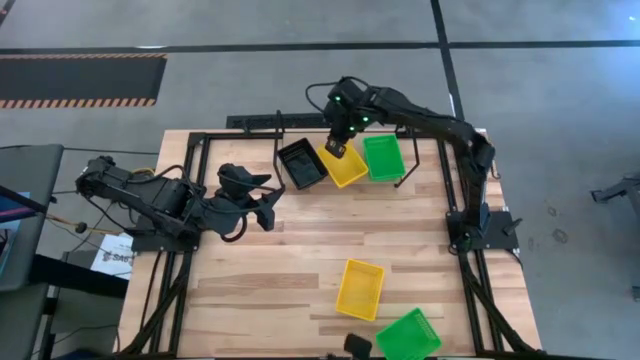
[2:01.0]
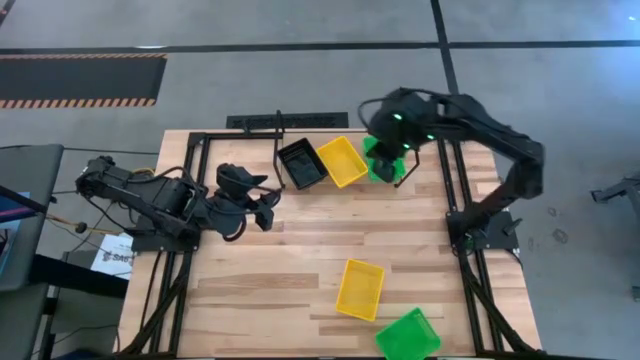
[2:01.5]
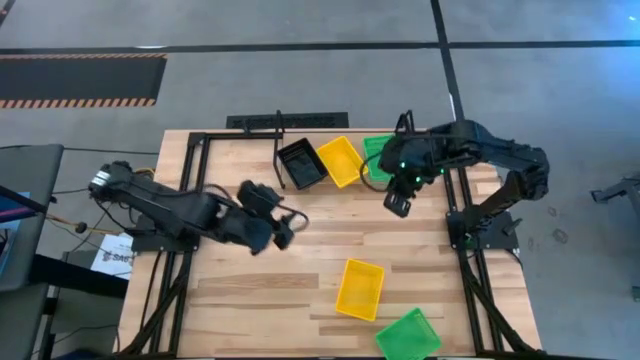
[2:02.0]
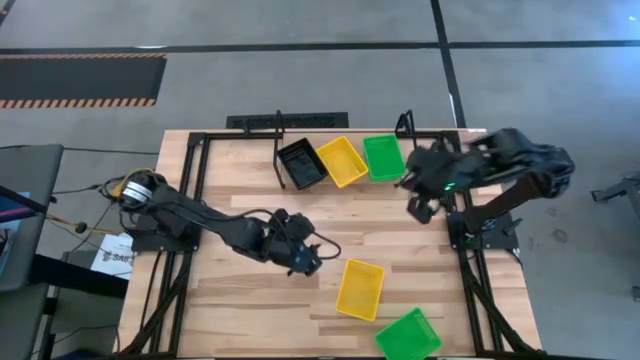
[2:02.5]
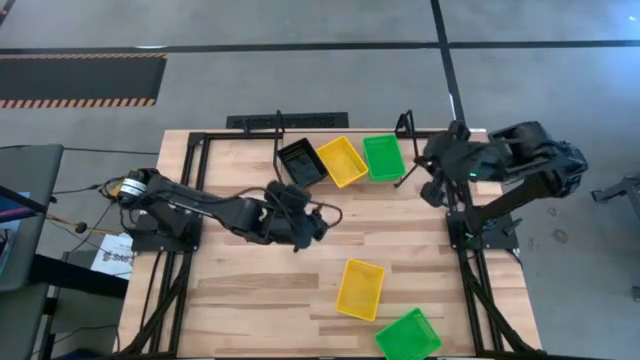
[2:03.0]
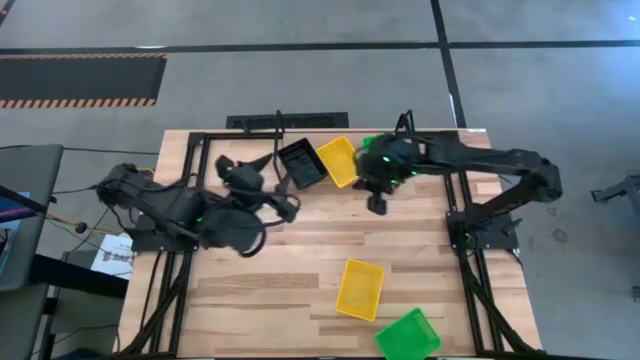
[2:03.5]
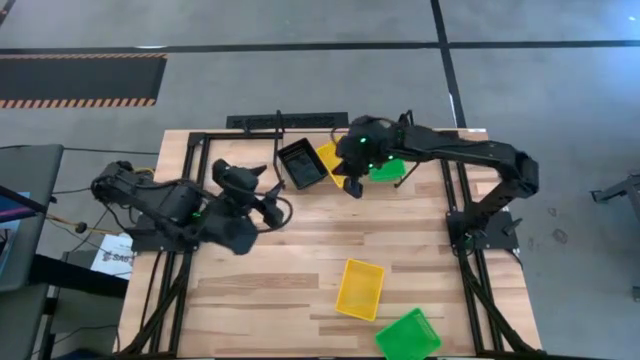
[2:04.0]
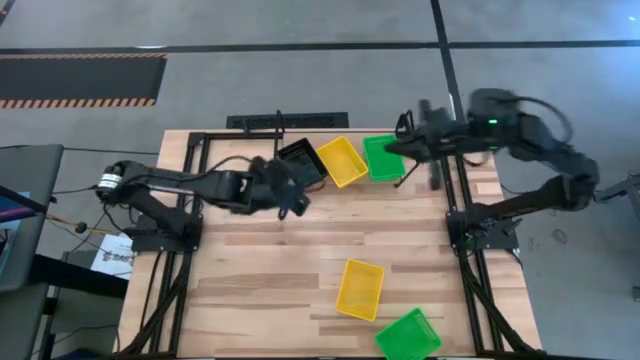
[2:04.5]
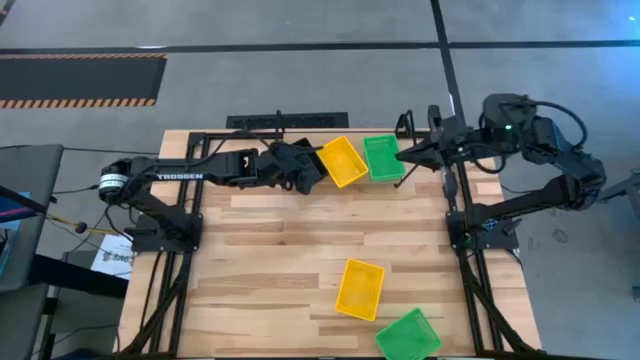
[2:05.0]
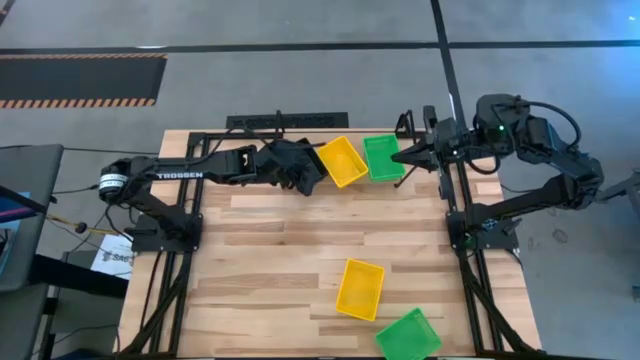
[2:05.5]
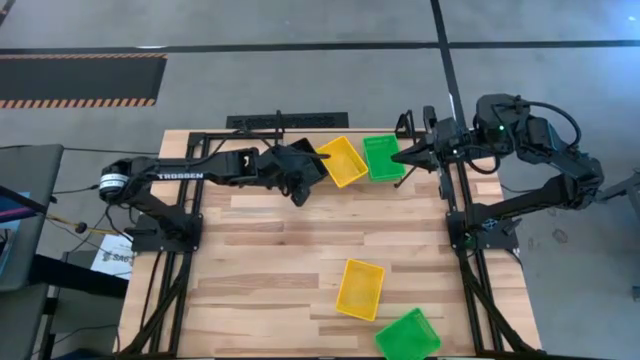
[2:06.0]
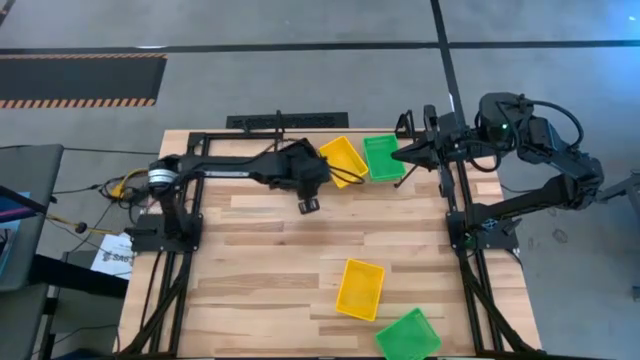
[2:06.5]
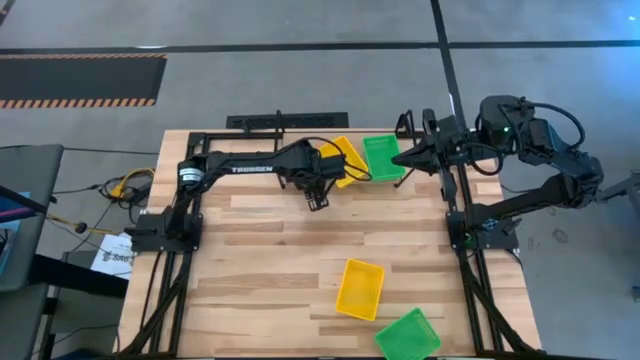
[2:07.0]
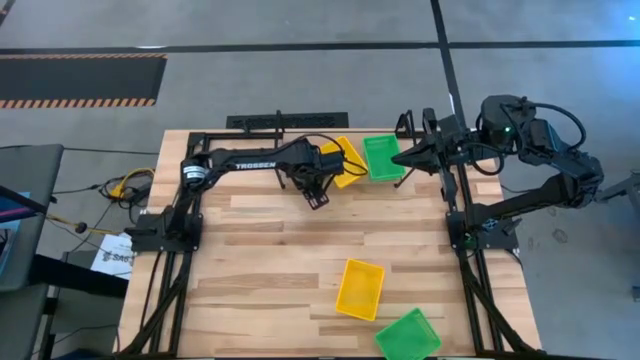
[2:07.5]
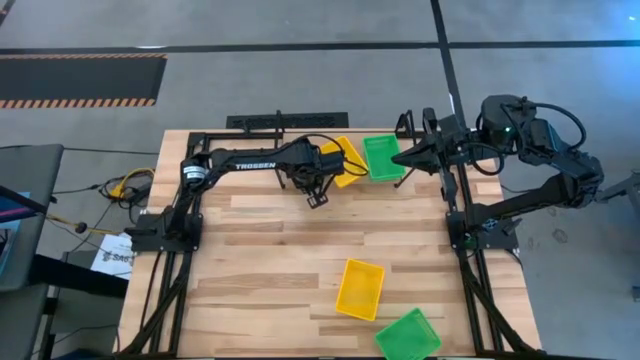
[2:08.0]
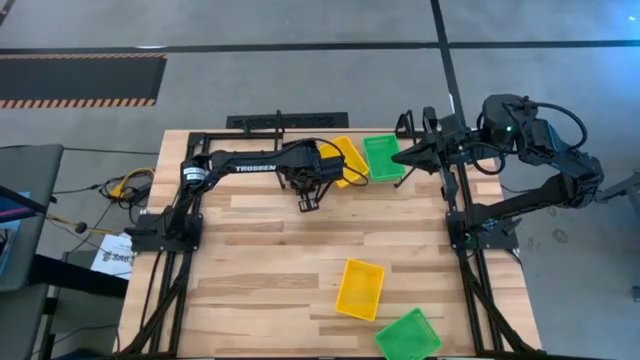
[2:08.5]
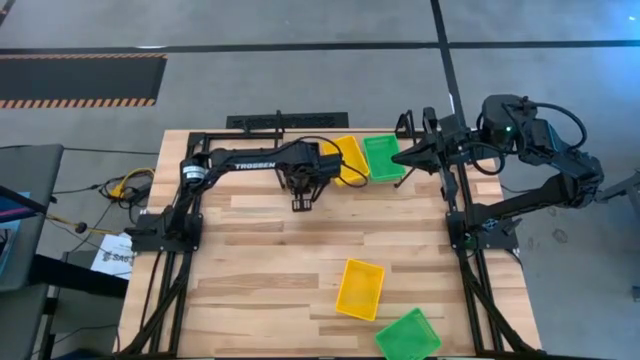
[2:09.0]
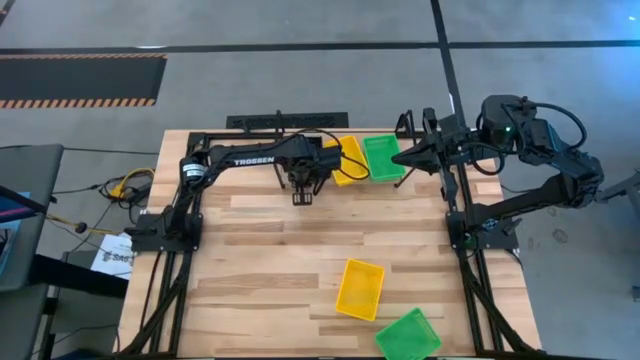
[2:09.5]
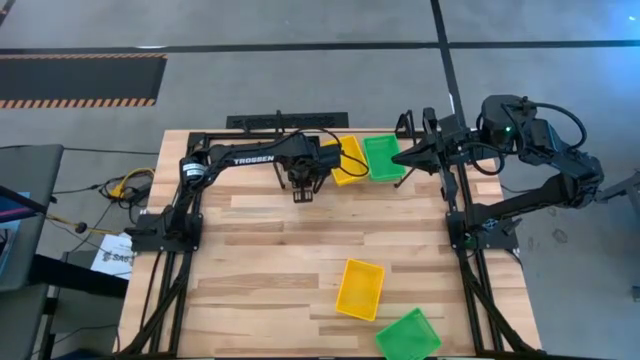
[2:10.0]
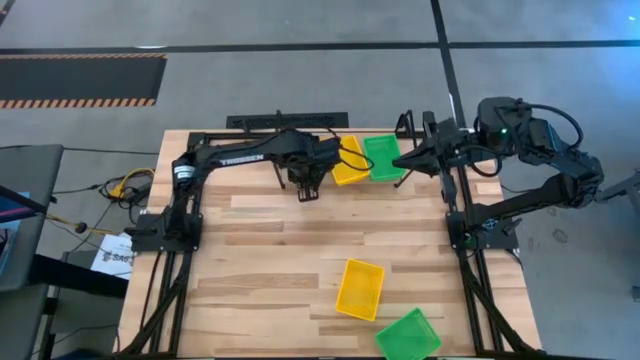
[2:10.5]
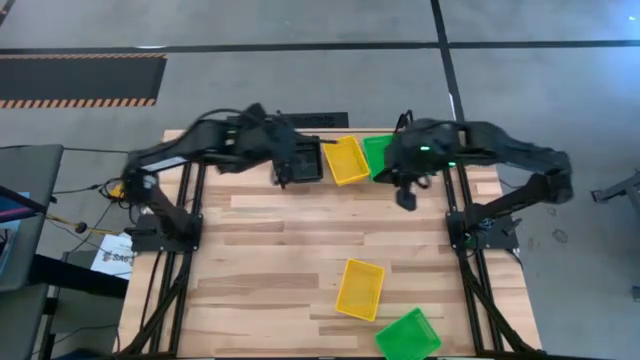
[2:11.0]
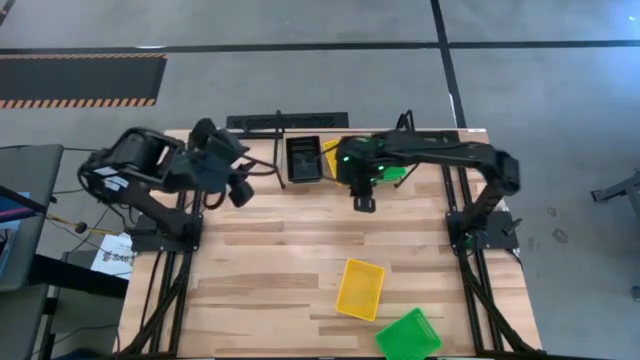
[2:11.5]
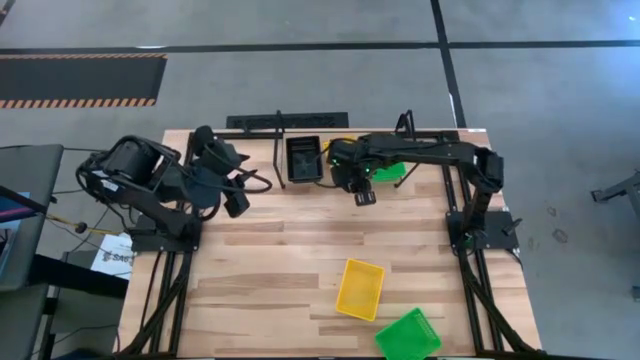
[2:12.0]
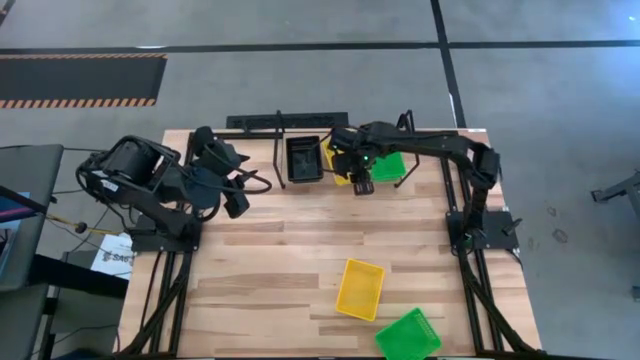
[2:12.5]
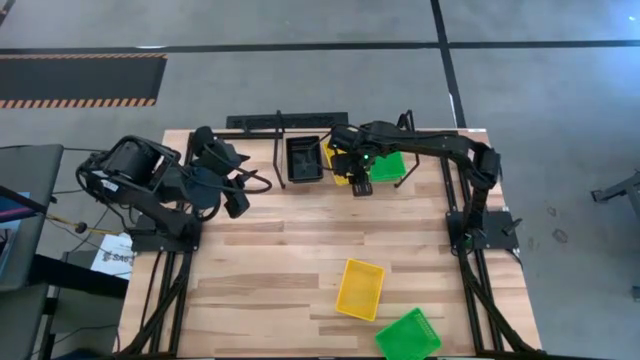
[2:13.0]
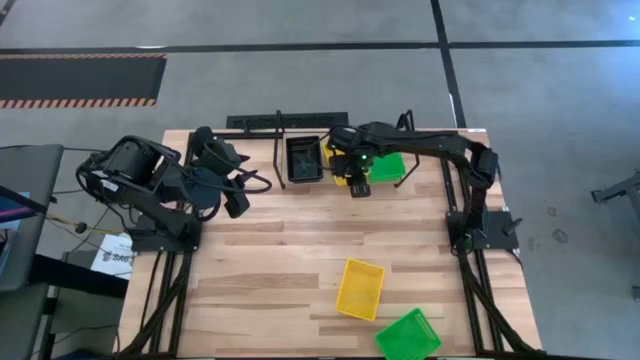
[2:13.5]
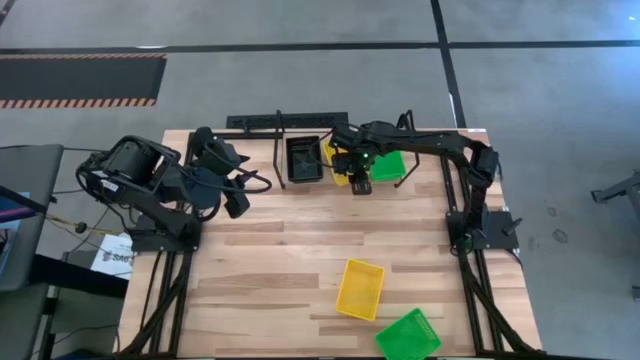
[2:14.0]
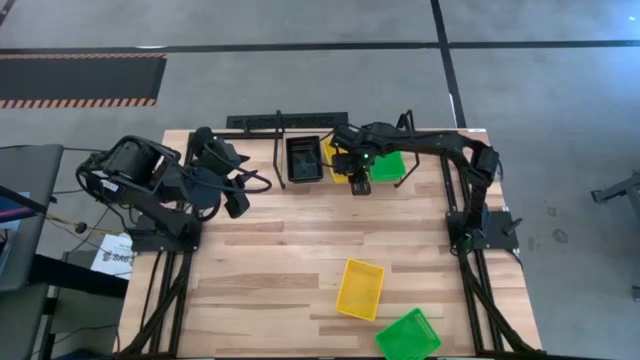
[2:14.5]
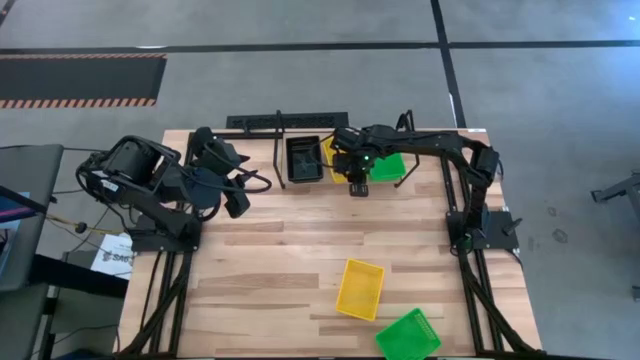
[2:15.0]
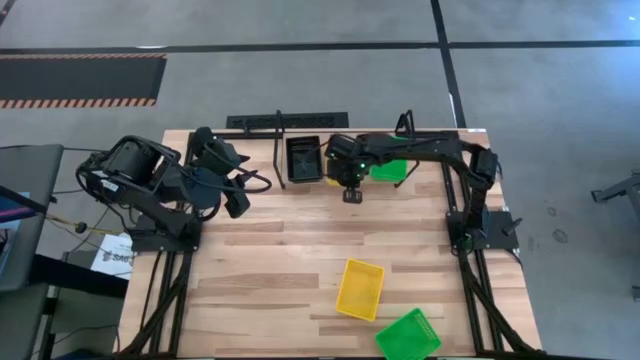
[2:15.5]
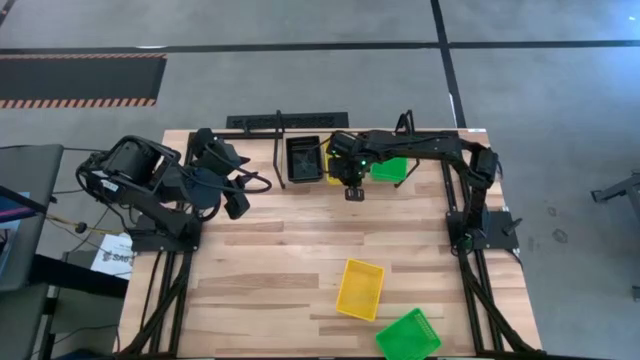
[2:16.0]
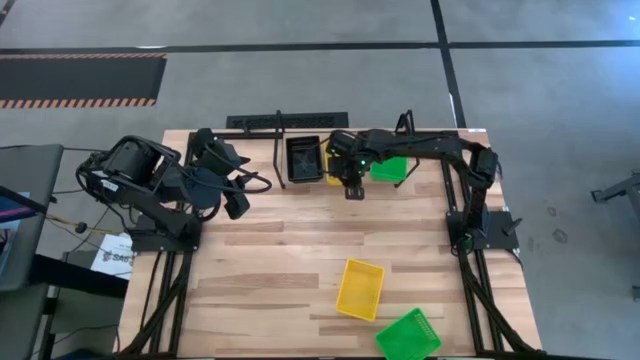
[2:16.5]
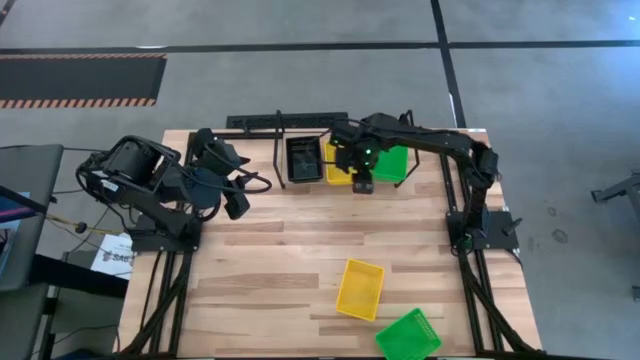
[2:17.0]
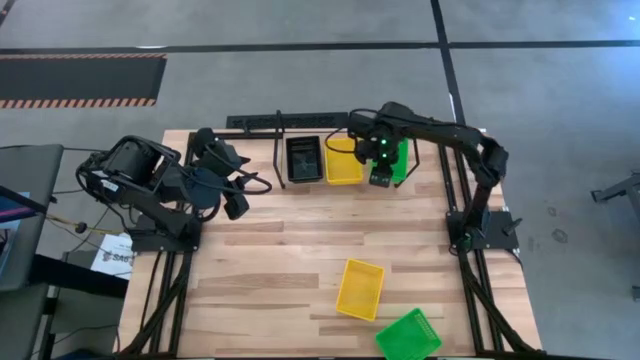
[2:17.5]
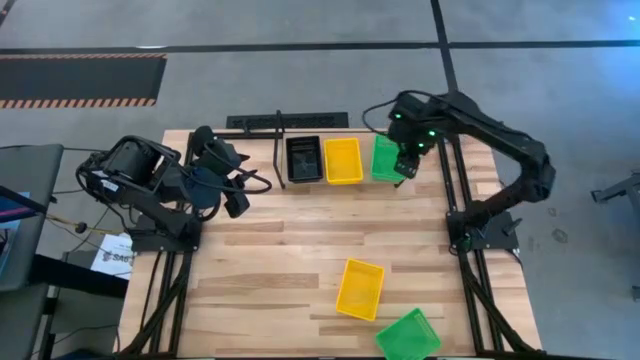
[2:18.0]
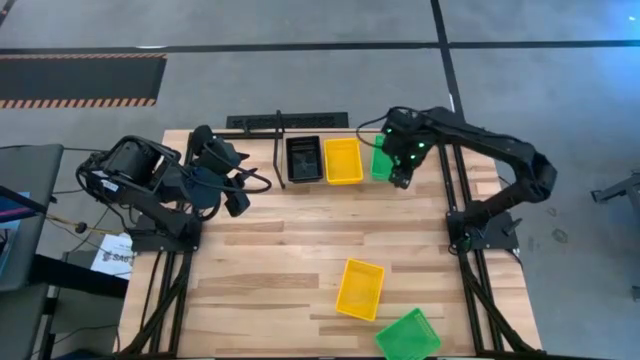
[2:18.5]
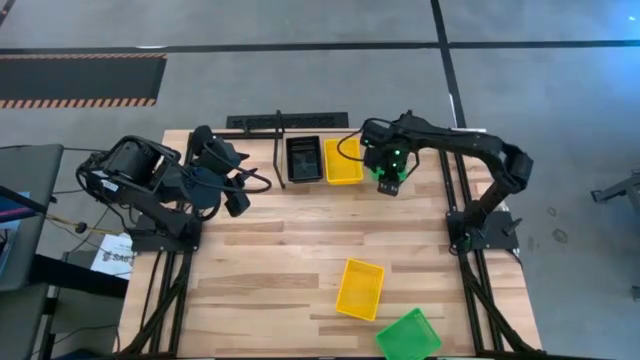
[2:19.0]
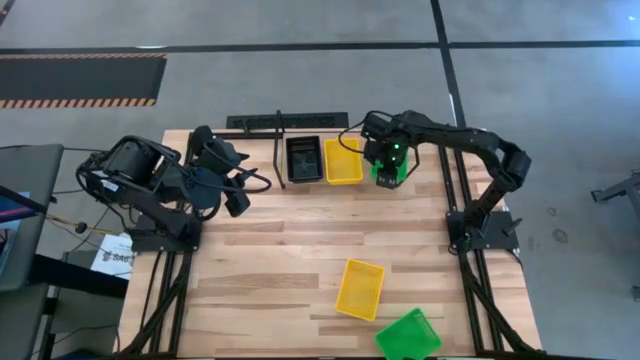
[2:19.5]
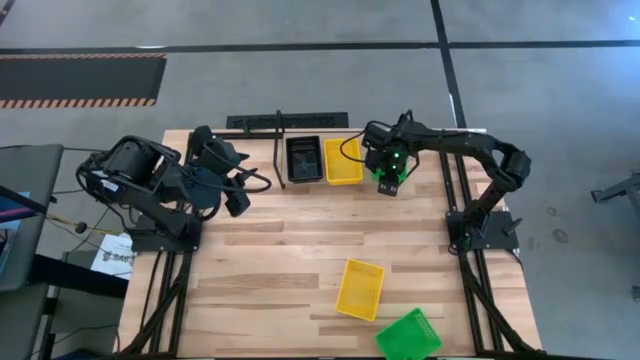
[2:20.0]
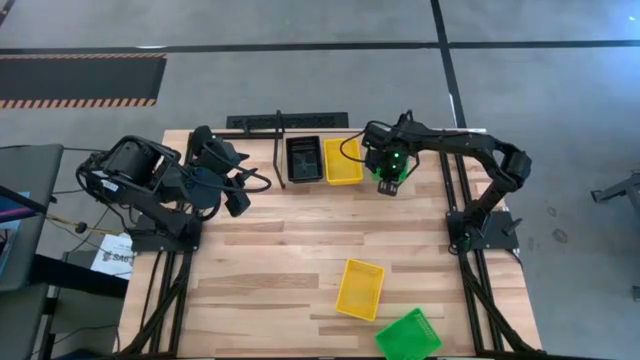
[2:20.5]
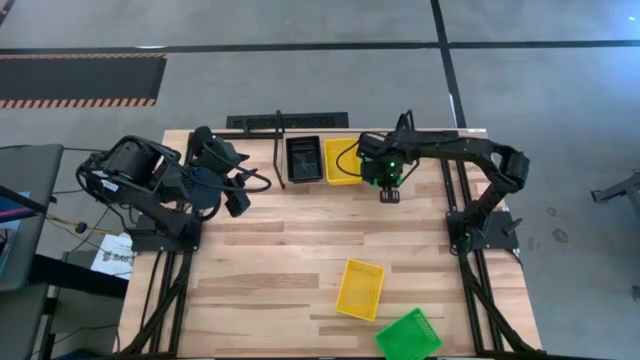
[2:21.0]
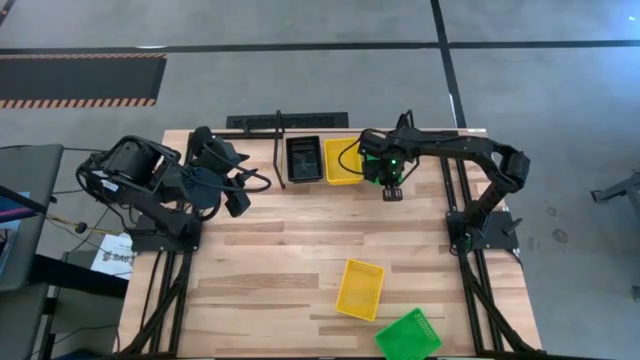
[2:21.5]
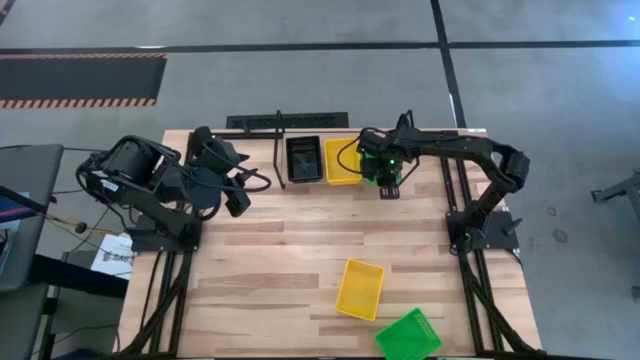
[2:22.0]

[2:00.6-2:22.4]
Task: Stack baskets on shelf by color
Adjust the stacked bins on the shelf
